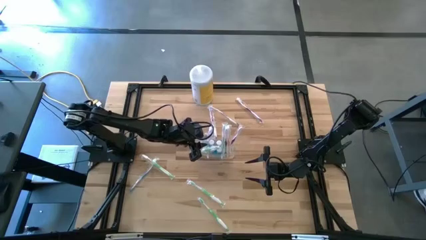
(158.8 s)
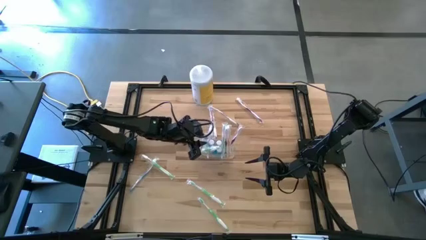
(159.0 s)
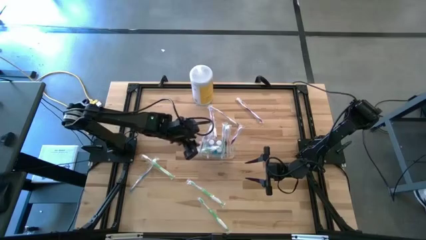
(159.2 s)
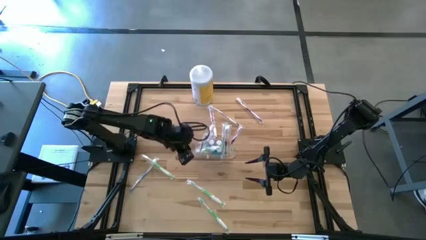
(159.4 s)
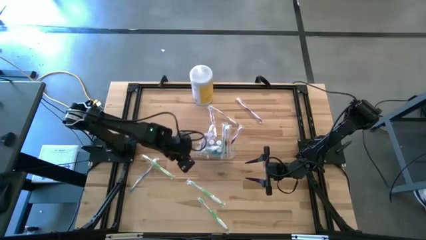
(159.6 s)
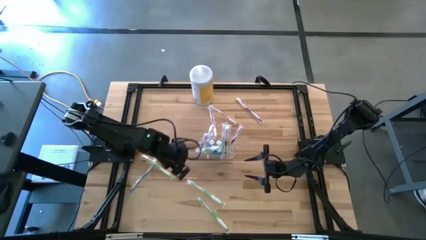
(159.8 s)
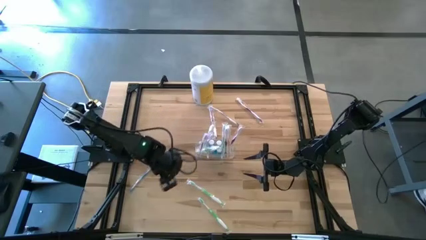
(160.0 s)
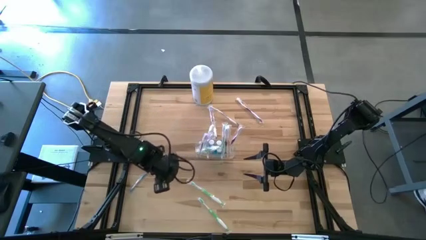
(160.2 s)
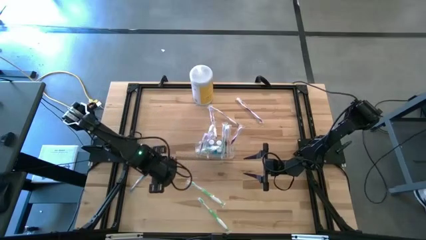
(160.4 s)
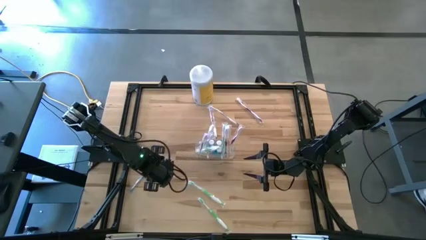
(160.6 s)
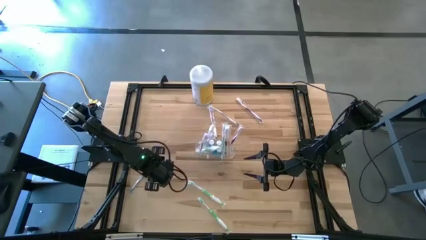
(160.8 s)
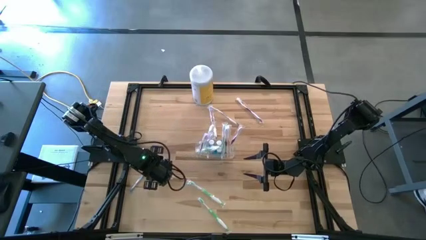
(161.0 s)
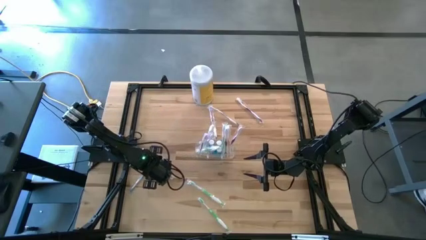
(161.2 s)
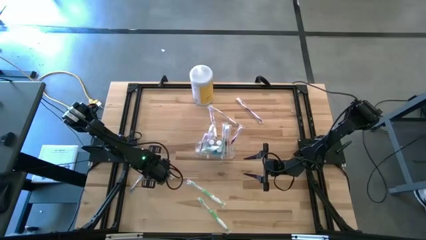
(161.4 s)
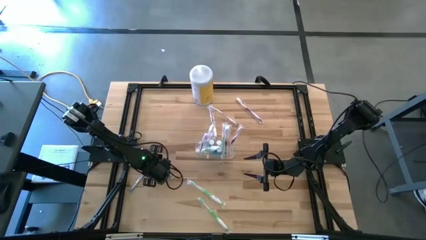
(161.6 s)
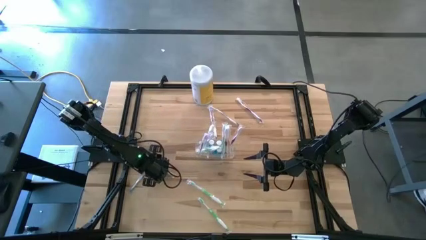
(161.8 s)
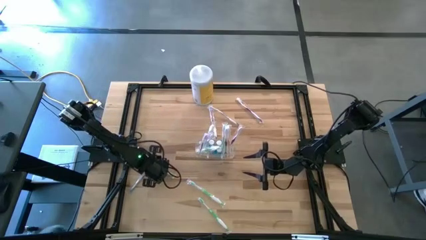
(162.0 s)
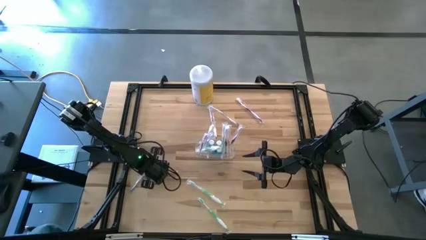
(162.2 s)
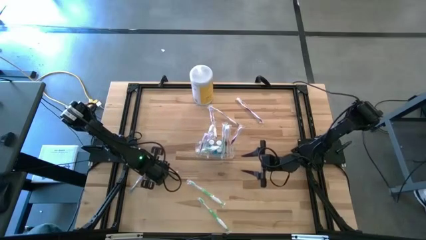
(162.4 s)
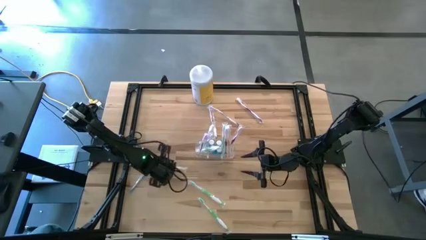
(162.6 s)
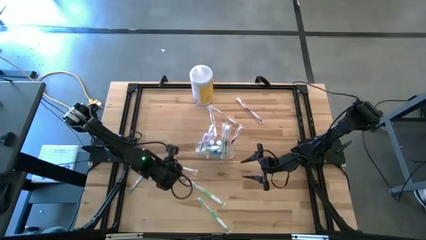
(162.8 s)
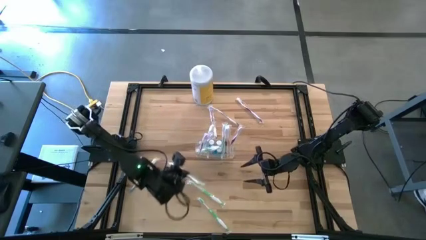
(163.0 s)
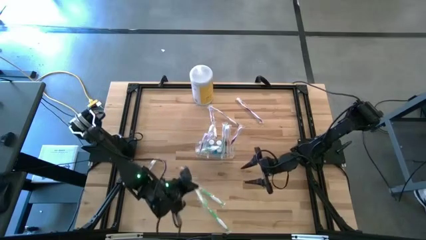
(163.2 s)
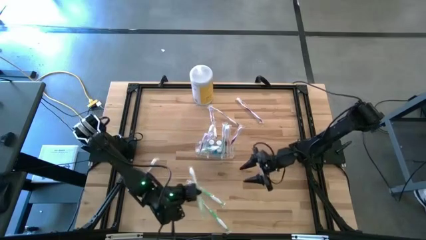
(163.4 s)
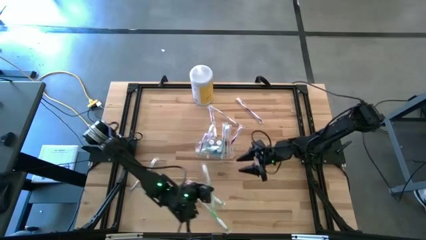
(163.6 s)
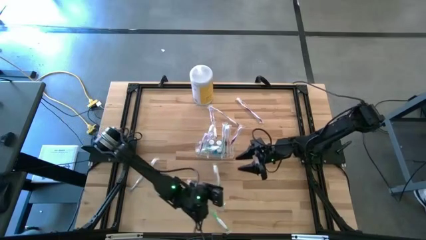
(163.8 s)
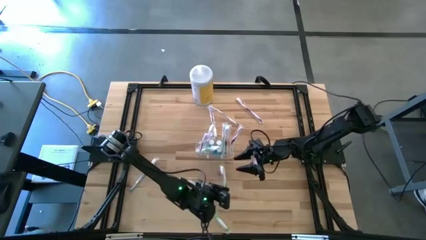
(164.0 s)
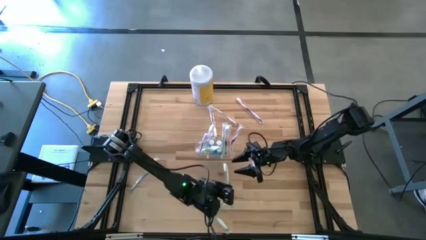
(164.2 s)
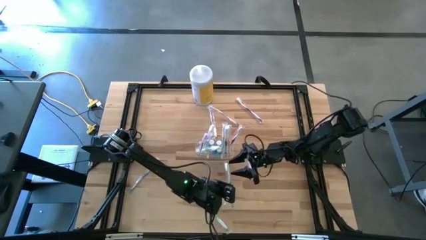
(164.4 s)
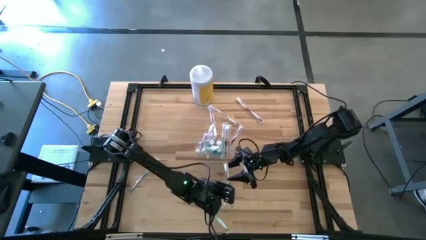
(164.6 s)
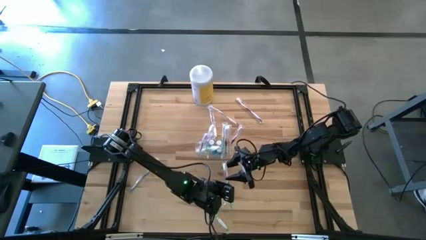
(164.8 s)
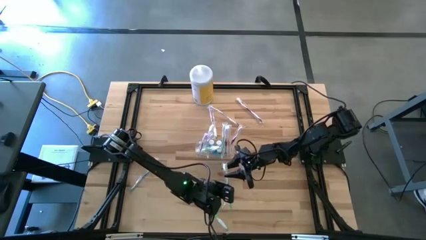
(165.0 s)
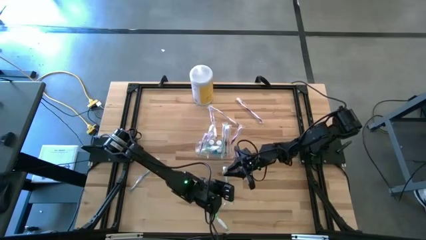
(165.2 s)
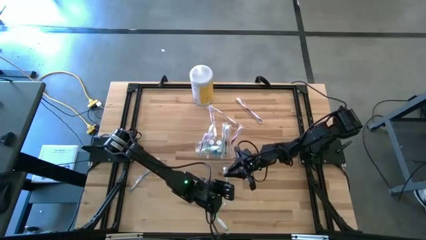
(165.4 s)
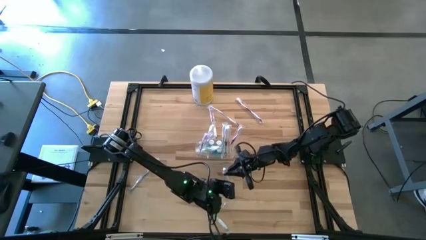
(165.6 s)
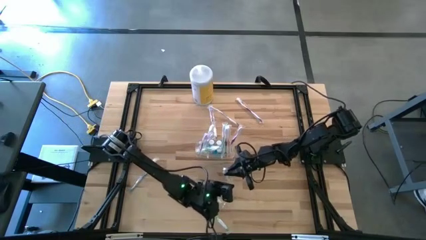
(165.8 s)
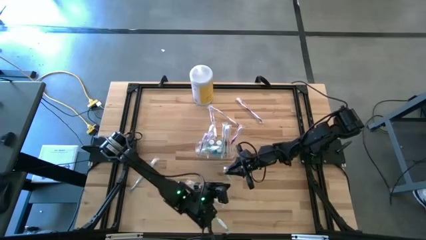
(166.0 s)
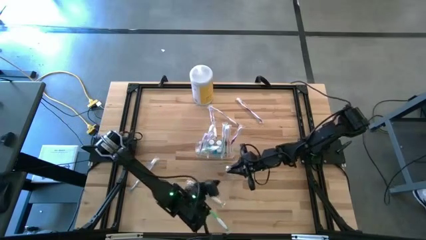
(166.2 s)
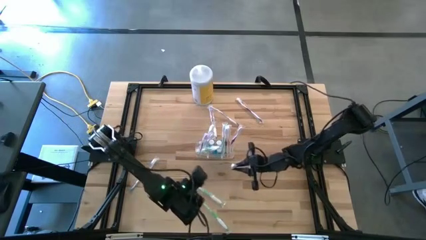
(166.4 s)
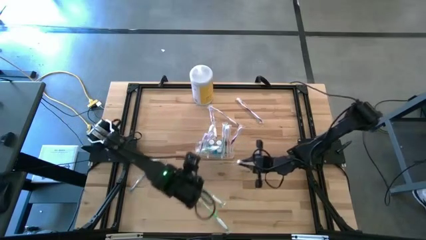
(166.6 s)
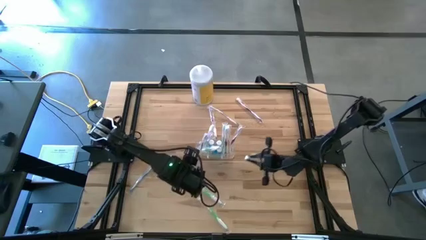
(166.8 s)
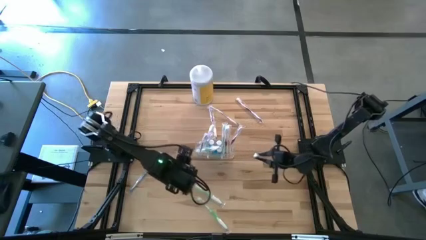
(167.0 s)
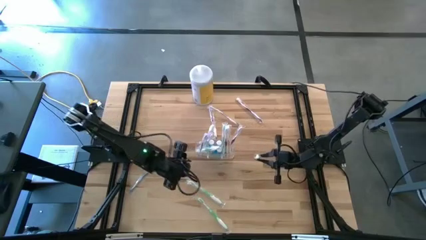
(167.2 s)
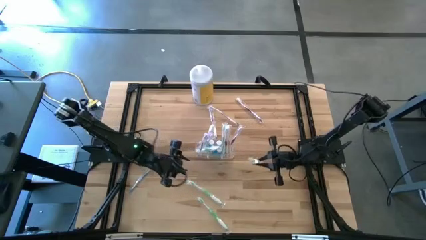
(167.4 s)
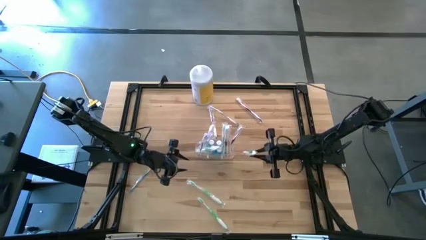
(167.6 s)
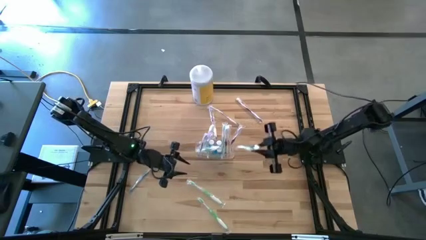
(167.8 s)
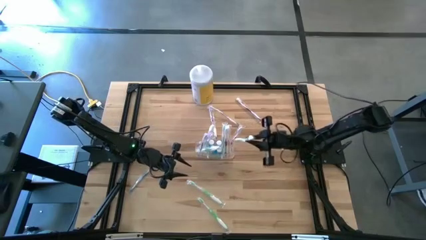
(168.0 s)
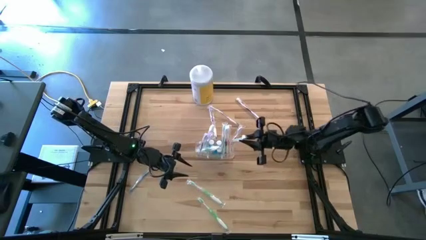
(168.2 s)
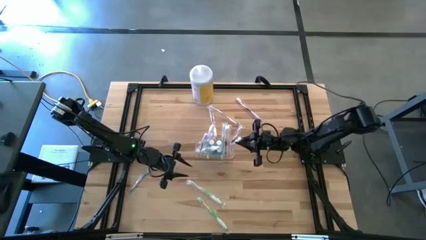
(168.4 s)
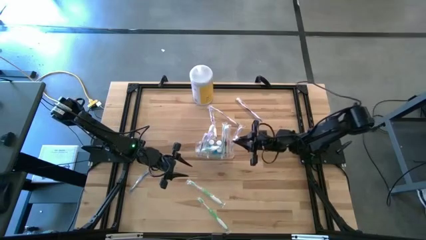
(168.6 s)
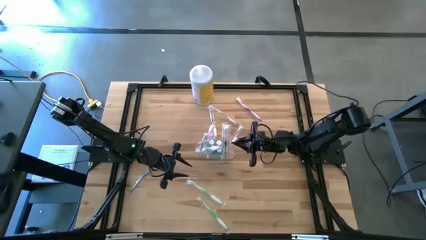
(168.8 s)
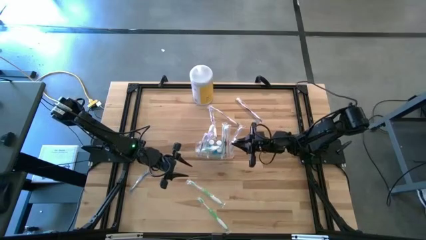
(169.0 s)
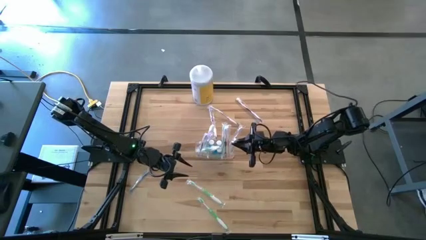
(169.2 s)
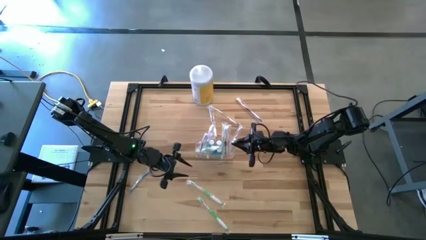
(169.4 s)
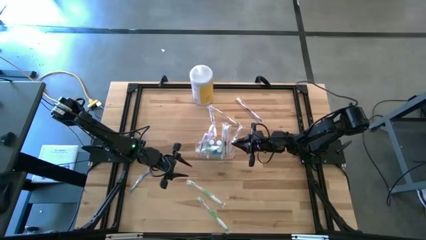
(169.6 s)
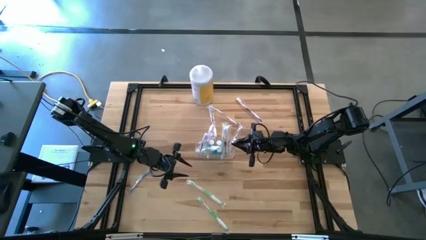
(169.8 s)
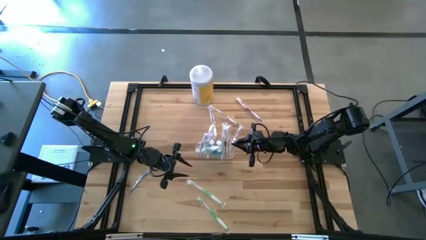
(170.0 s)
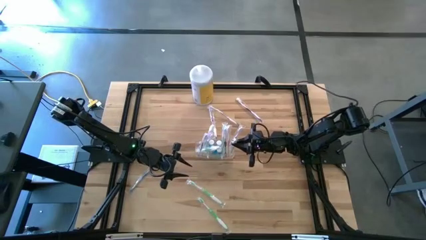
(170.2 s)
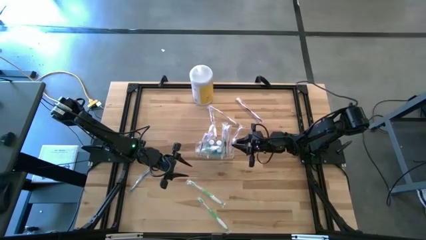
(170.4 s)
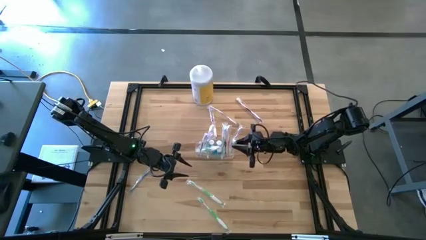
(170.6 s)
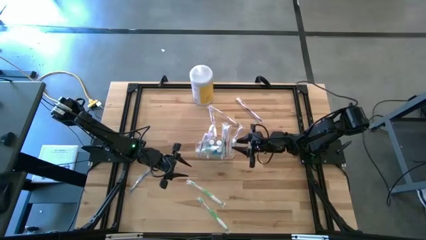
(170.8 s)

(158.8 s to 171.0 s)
Task: Pick & Place toothbrushing station
Put the green toothbrush into the transparent organizer

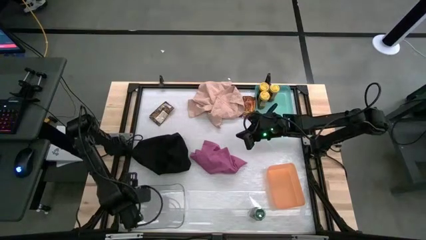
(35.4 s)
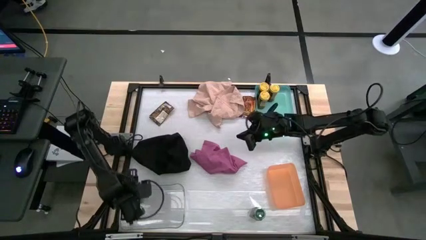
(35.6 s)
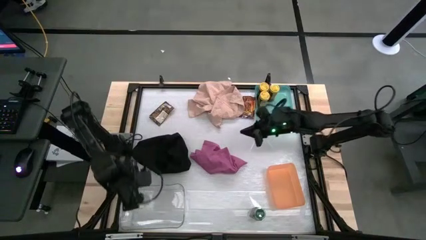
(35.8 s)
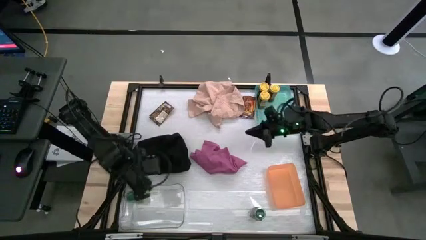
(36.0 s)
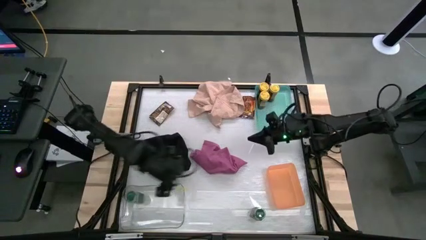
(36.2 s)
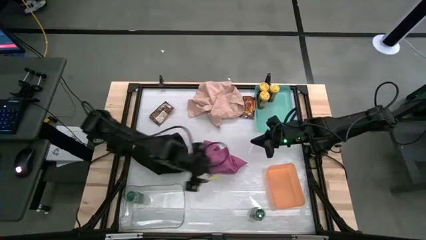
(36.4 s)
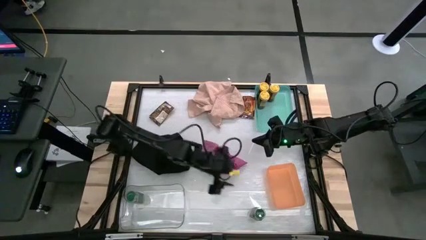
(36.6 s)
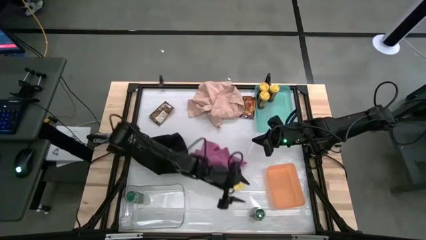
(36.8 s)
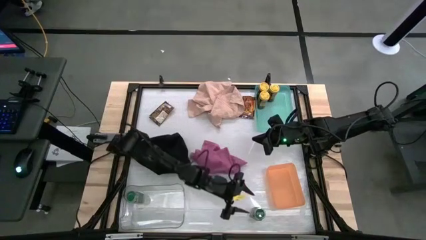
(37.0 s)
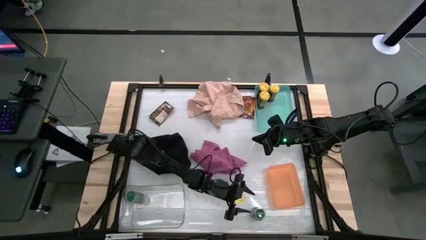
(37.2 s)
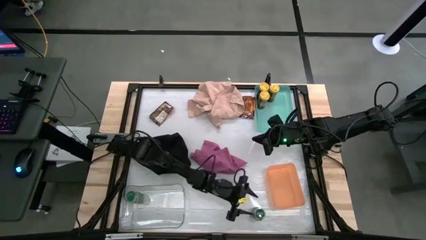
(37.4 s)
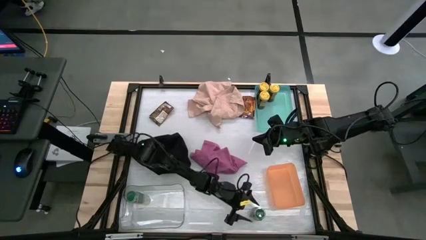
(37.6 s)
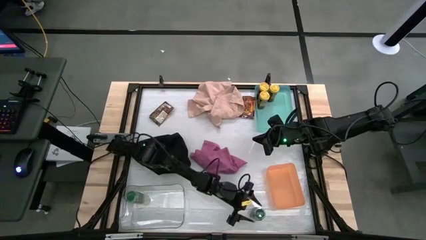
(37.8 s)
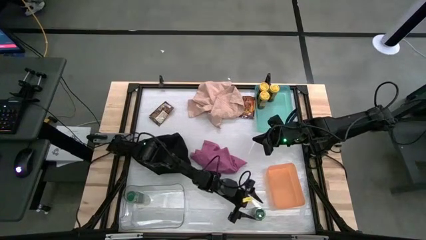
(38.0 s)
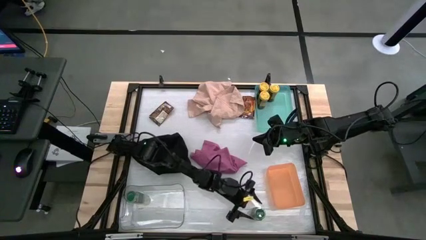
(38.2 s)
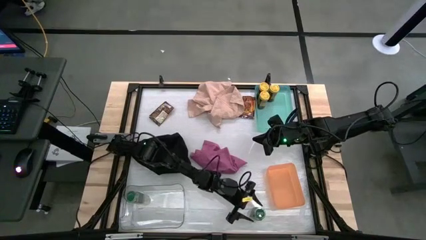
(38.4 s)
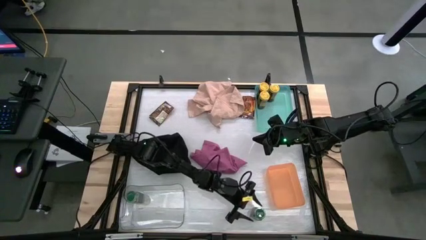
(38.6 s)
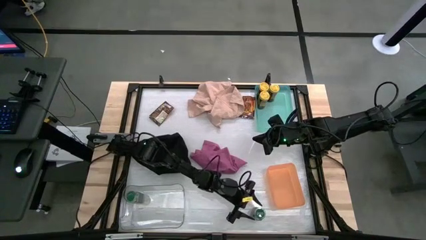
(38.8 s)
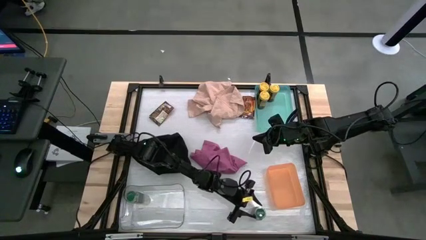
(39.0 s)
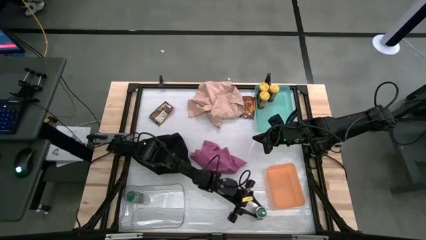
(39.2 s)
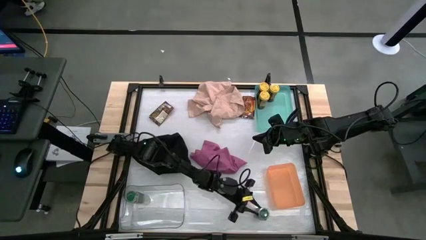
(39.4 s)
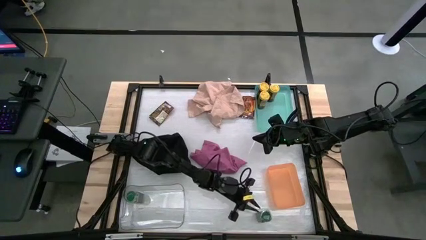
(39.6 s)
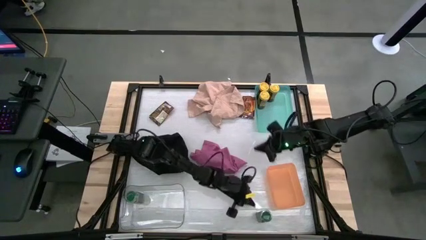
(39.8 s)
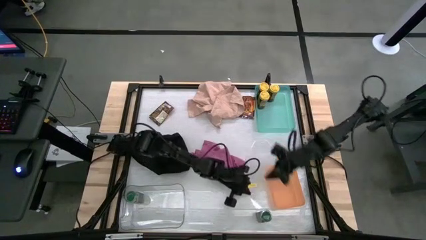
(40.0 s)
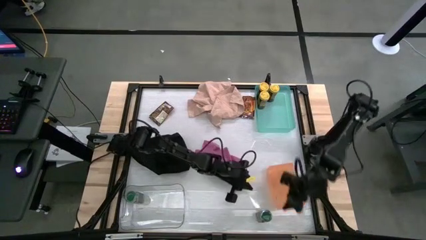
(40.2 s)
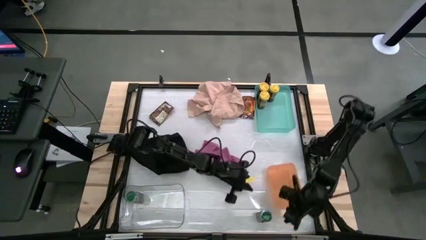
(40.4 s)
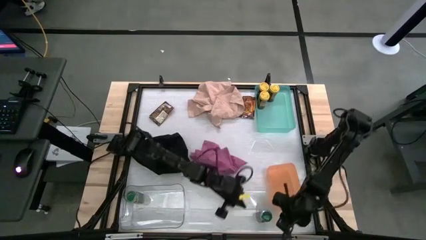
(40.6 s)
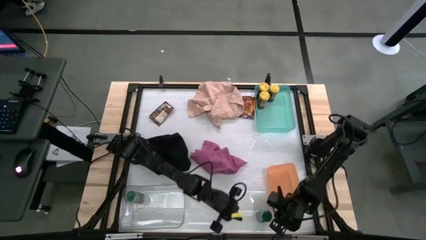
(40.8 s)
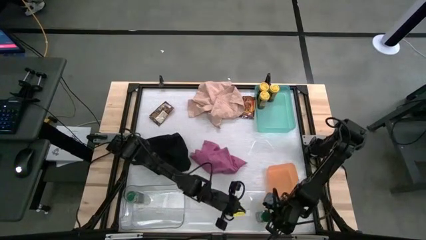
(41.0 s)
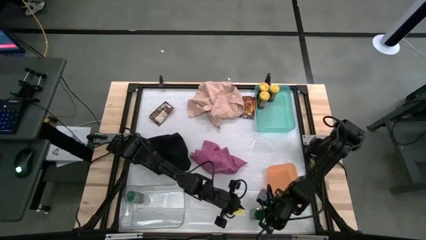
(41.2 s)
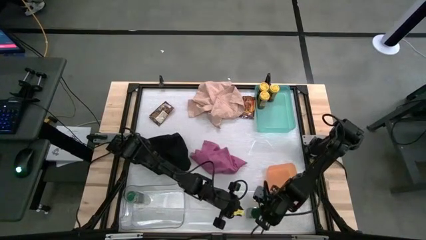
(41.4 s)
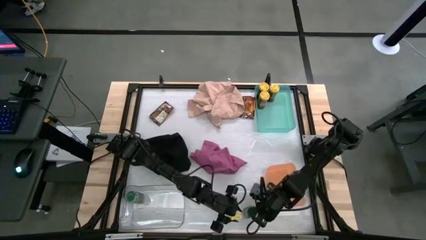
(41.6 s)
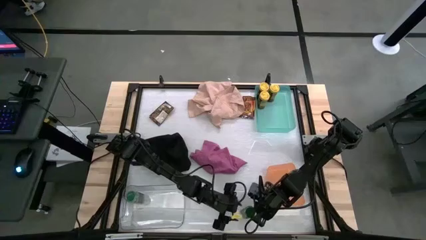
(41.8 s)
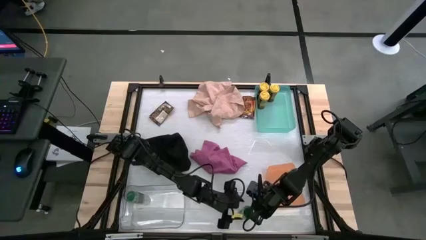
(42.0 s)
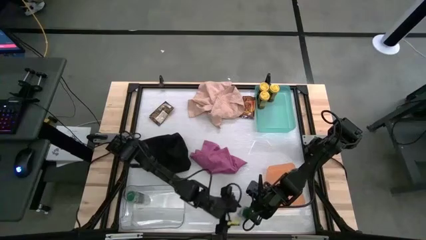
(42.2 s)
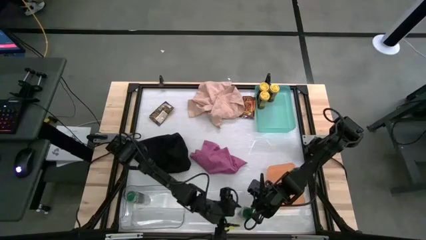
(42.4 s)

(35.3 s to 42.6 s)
Task: Sort spices by type
Put the green seasoning bottle into the transparent bin
